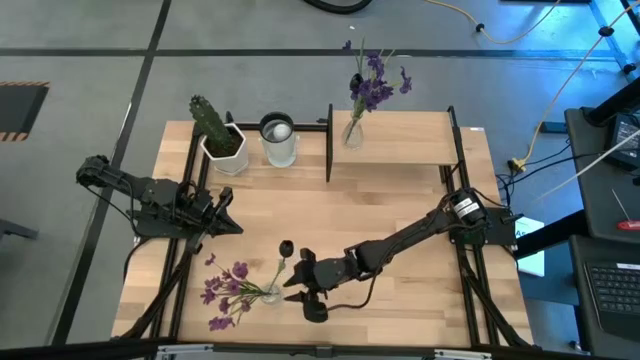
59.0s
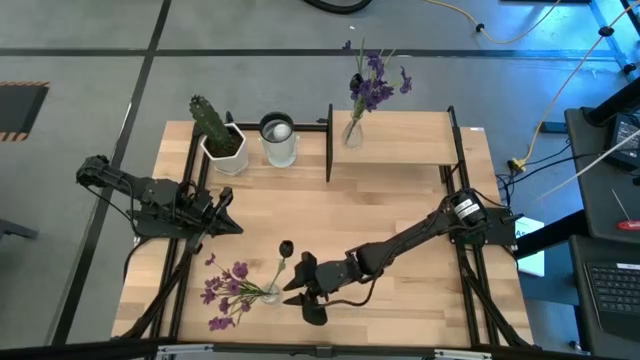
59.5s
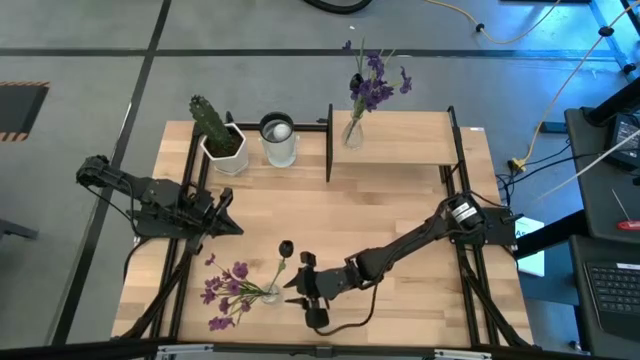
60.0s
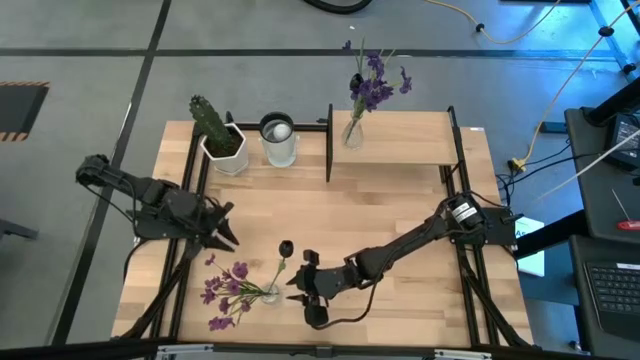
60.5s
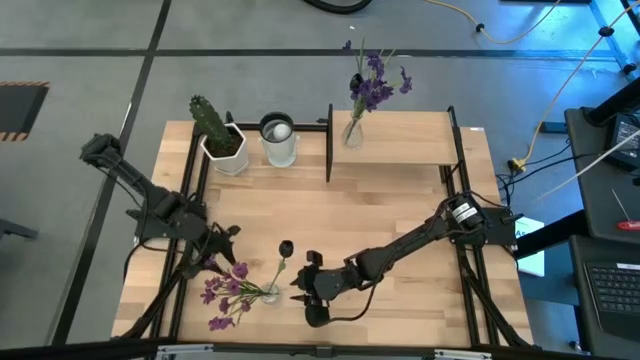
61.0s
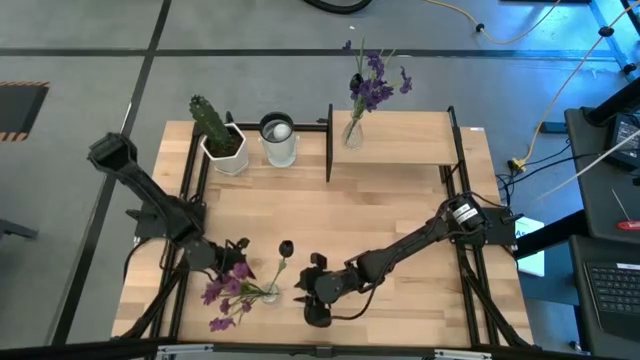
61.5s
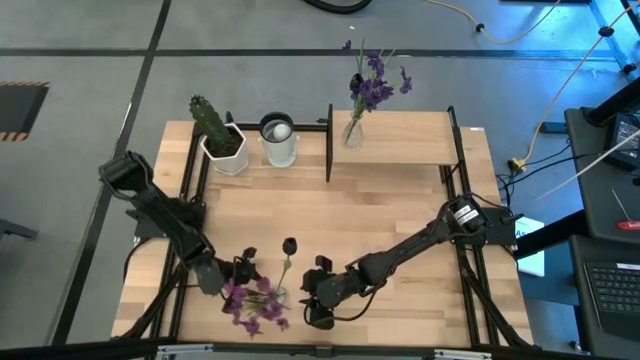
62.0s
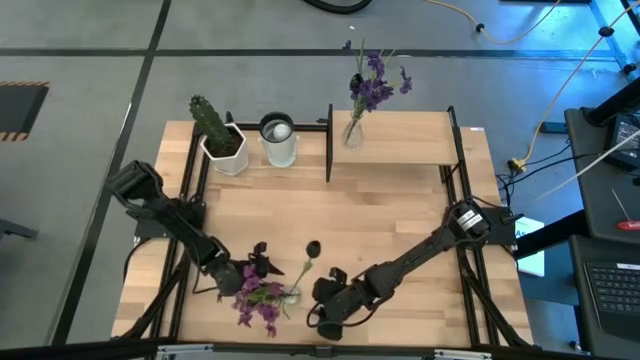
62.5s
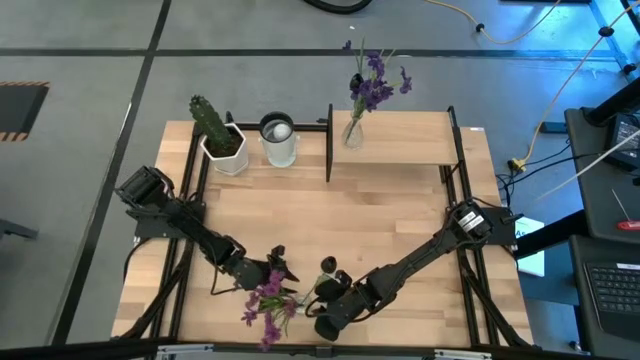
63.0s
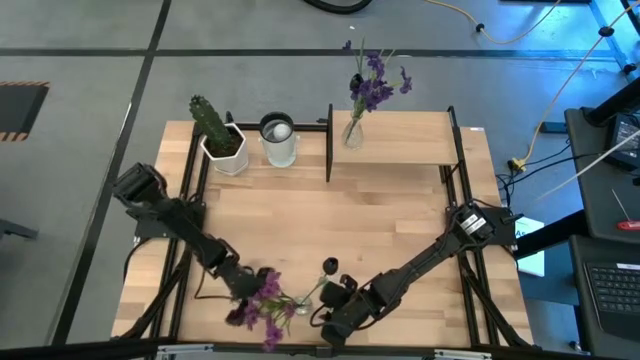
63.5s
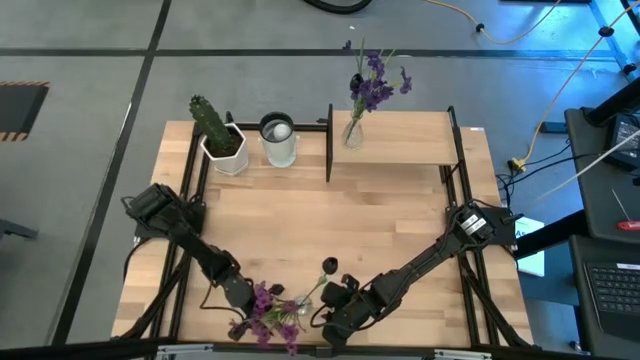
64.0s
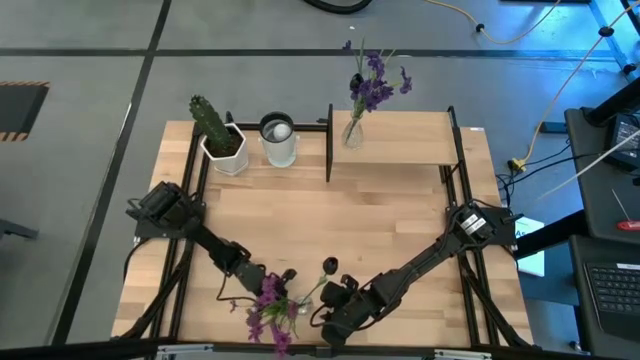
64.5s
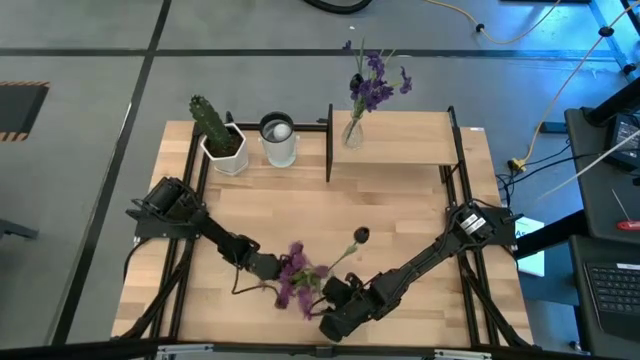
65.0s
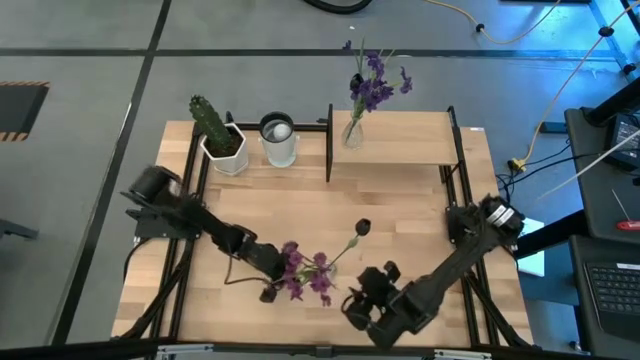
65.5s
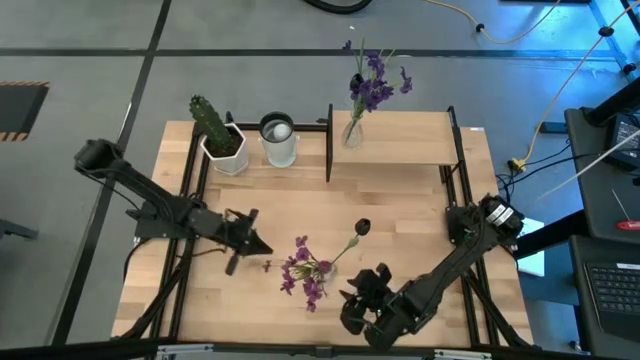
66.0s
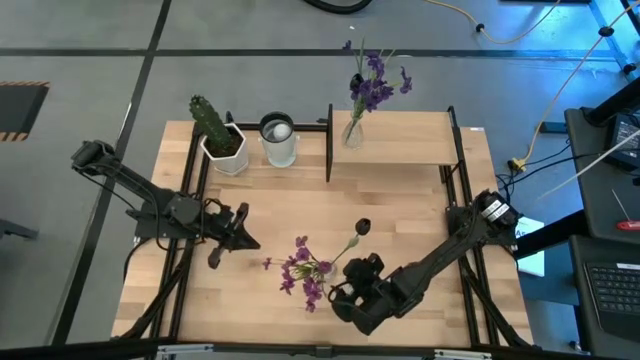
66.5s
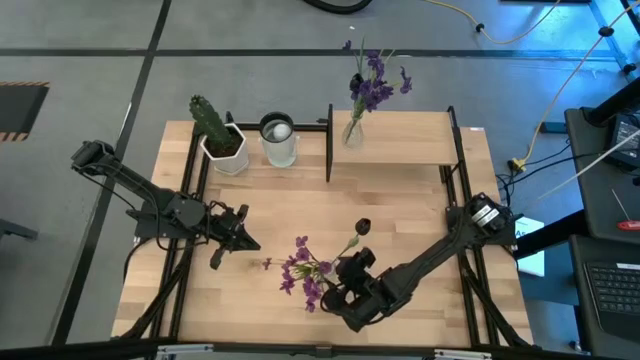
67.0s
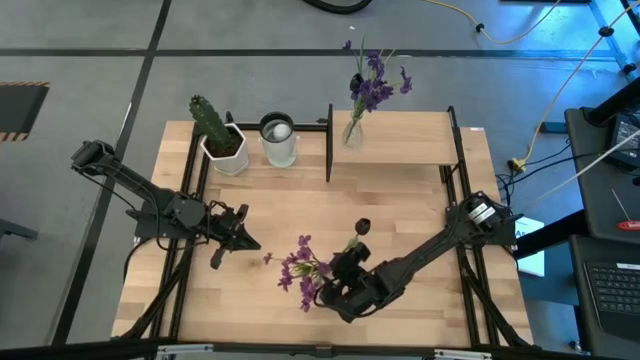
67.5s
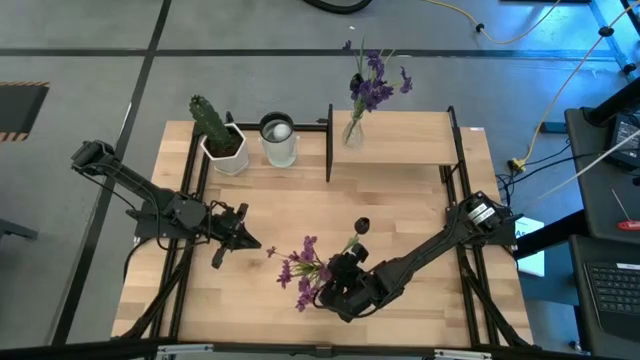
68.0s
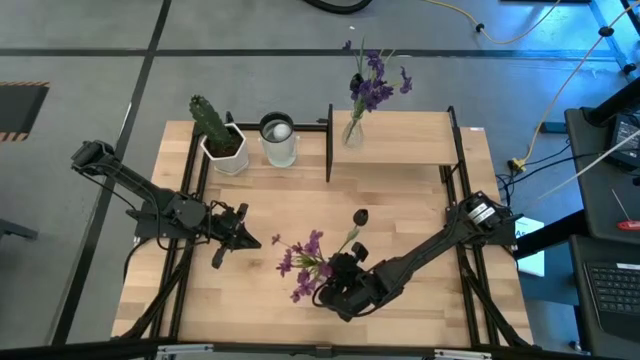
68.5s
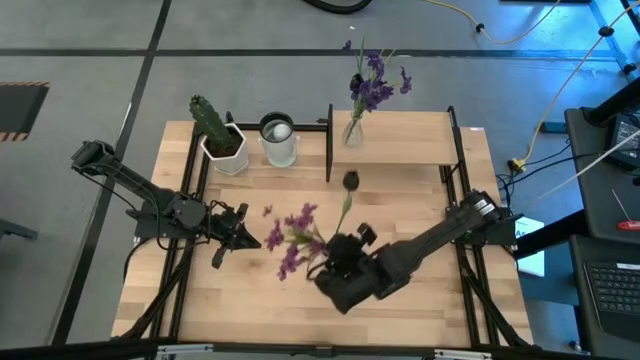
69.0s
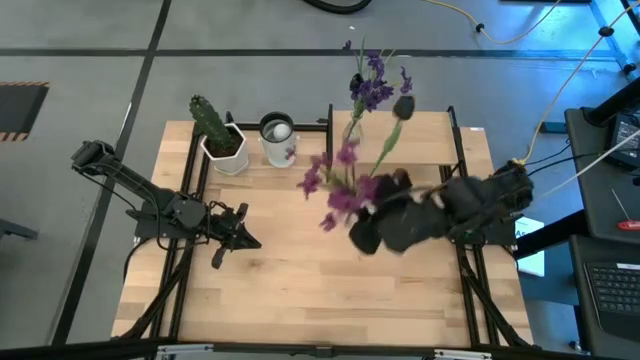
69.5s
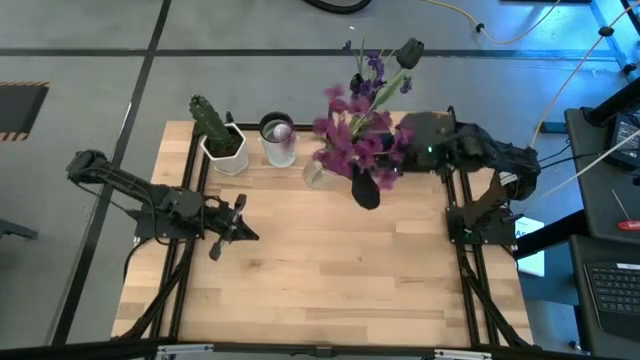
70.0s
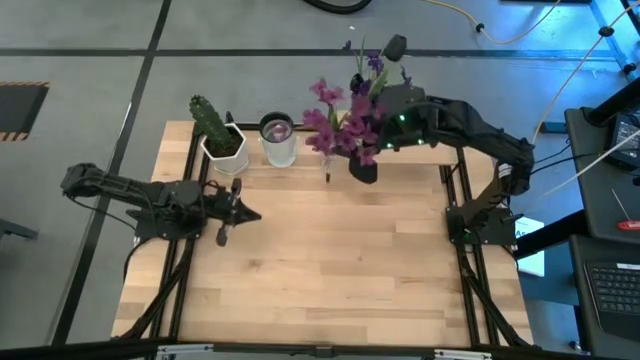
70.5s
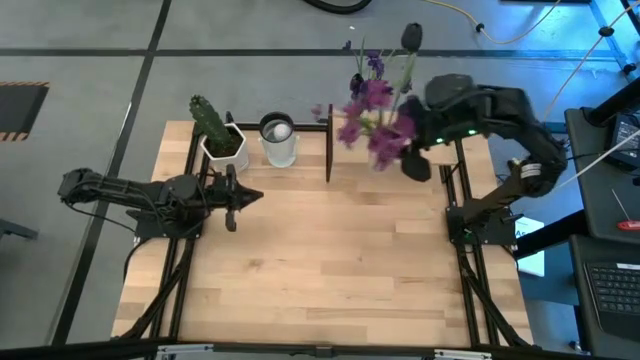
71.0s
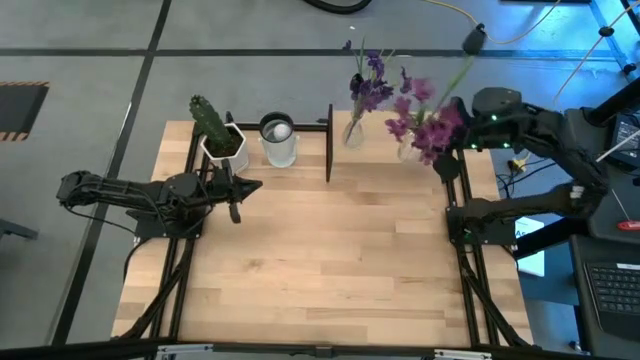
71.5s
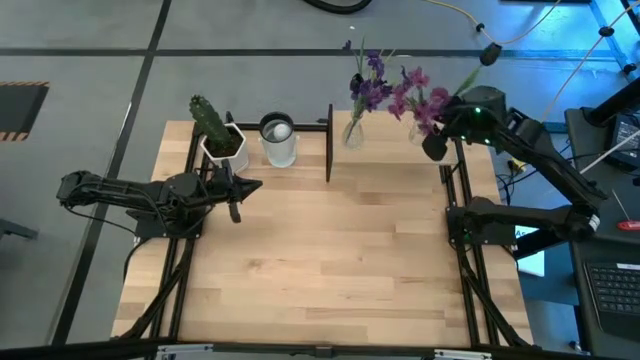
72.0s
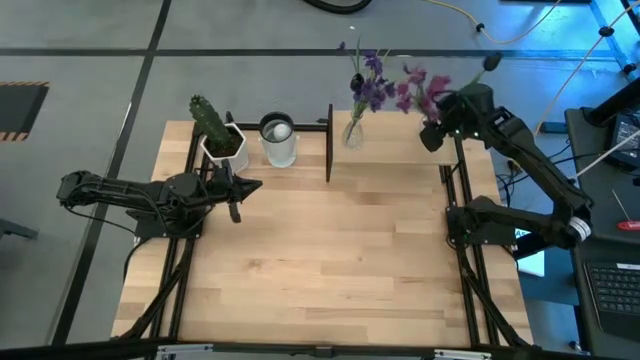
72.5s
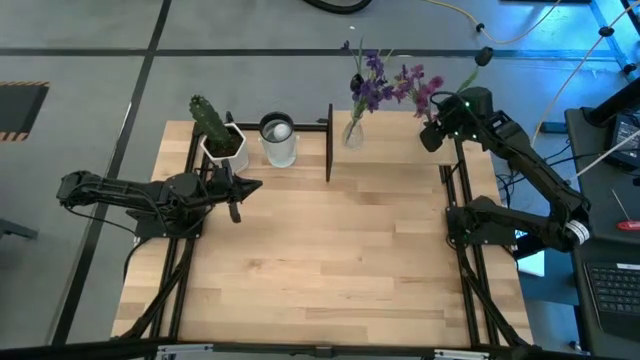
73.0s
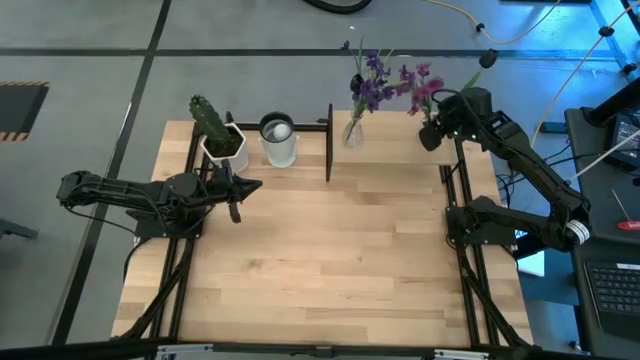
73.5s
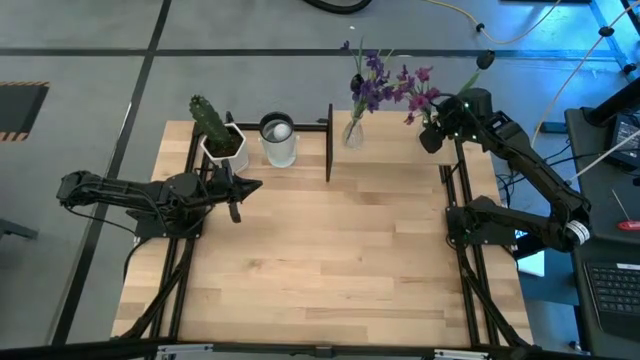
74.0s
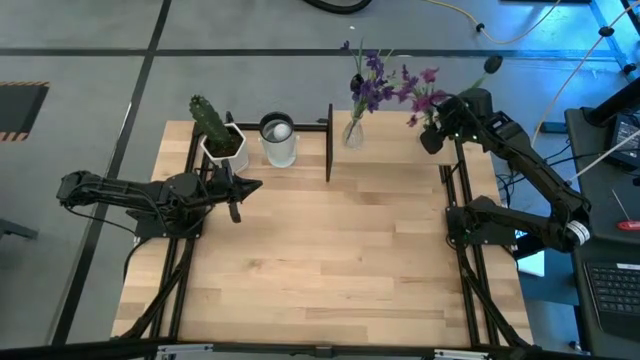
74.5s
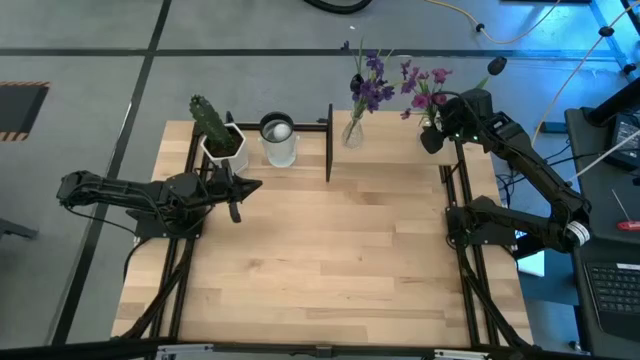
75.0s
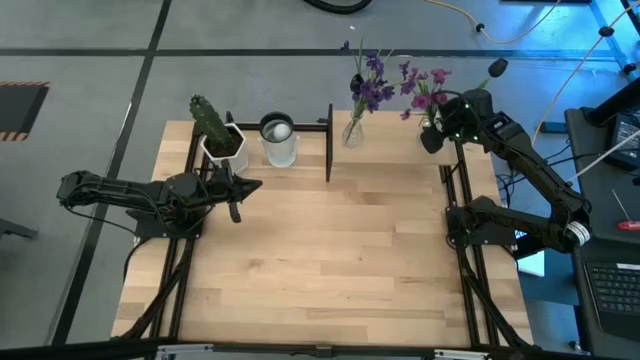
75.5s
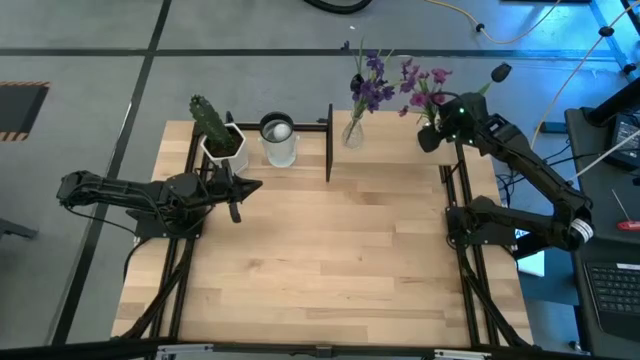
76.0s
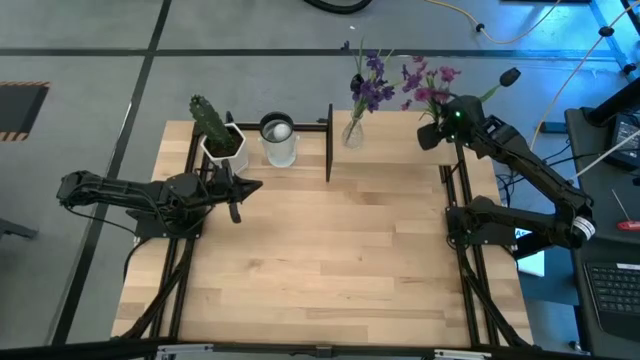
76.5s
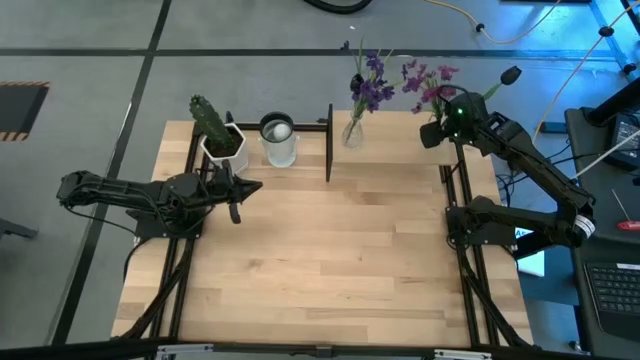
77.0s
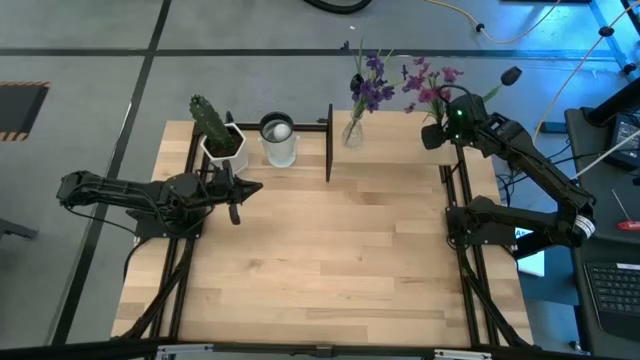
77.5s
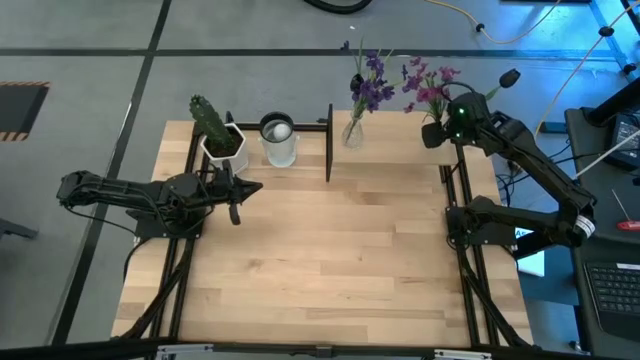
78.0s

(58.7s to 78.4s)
Task: Pick and place flowers into a vace then onto a shelf
Put the transparent vase with the flowers on the shelf

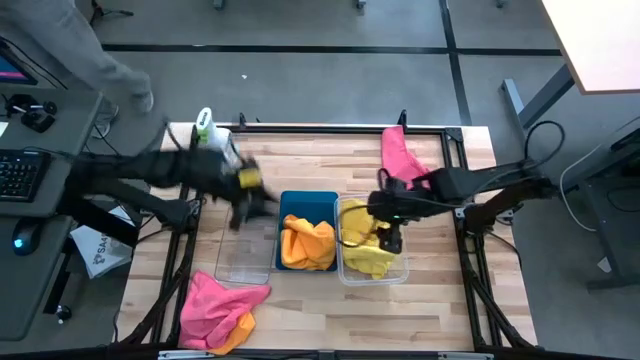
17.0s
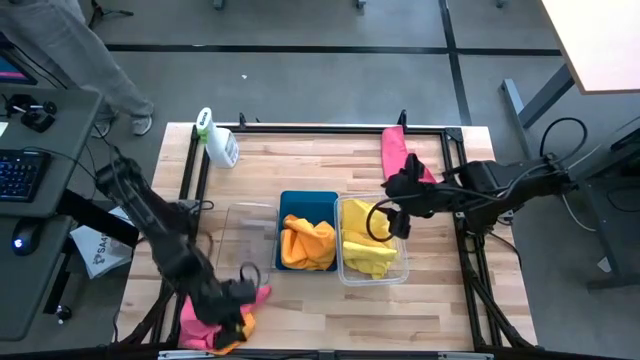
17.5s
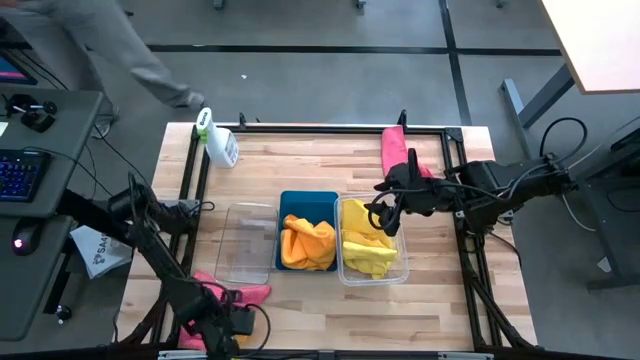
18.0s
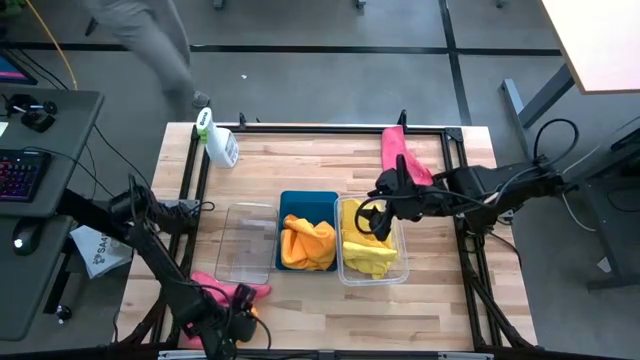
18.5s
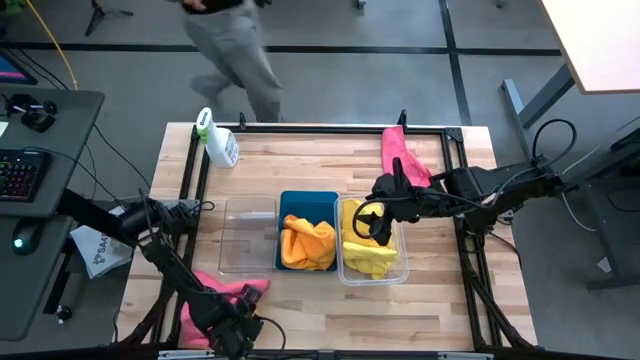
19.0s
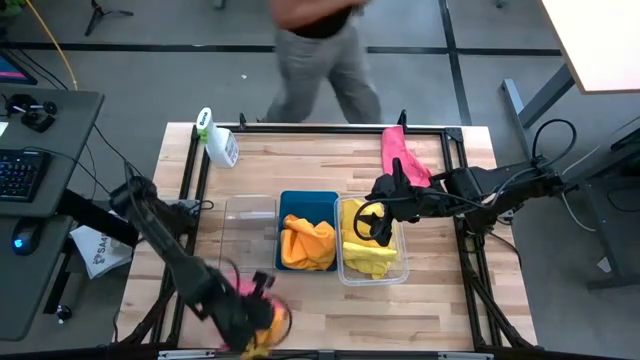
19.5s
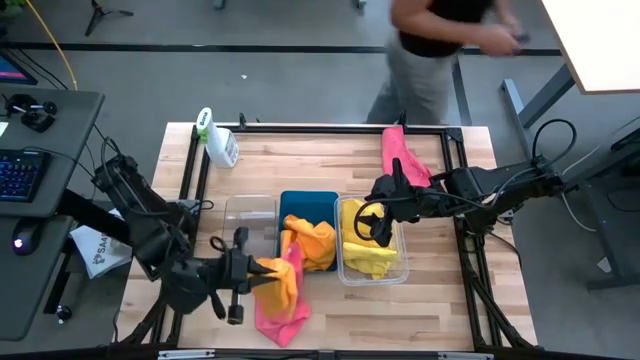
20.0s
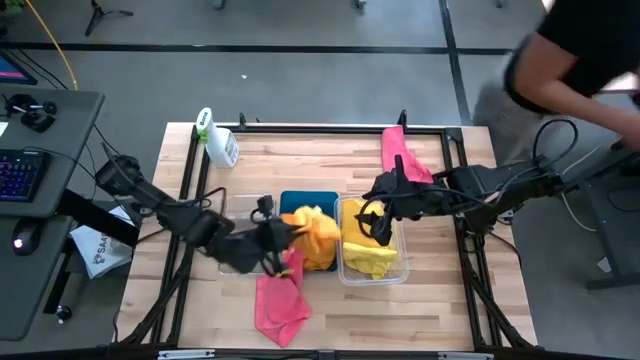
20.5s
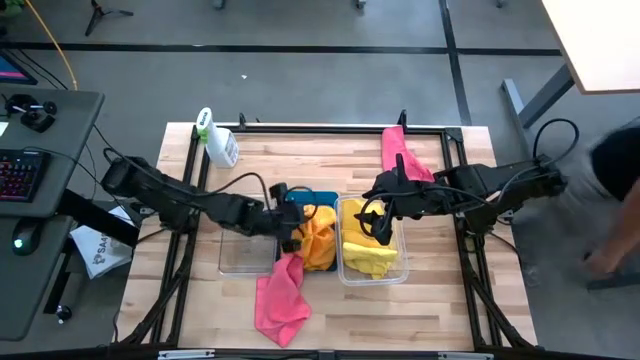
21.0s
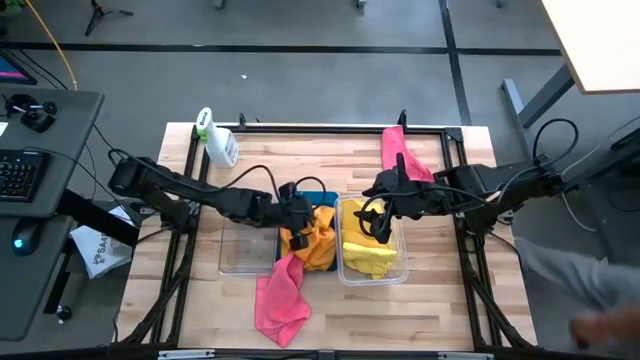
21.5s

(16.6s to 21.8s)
Task: Sort microfiber towel by color & place in baskets
Put the orange microfiber towel into the blue bin
